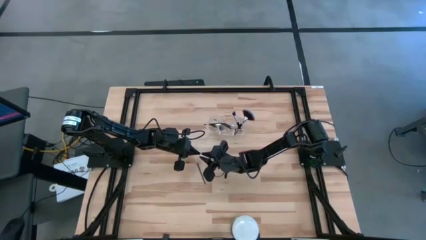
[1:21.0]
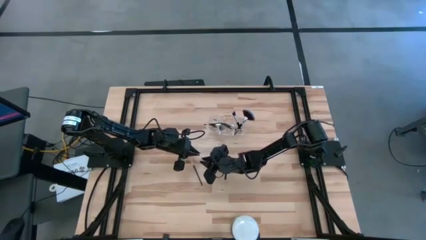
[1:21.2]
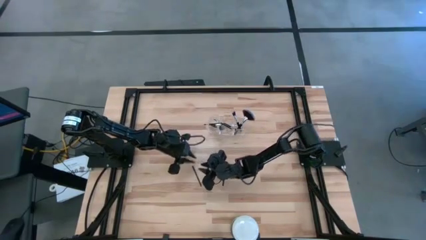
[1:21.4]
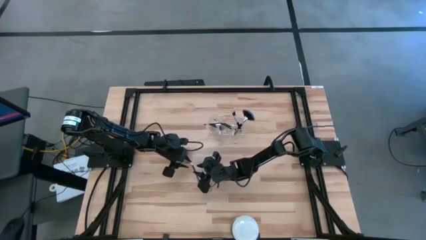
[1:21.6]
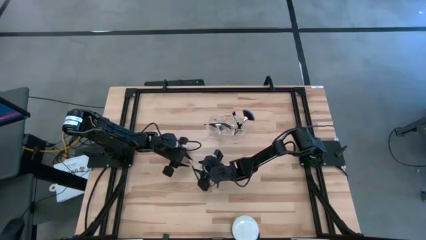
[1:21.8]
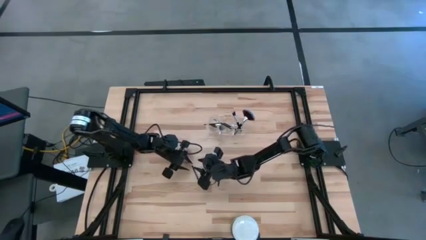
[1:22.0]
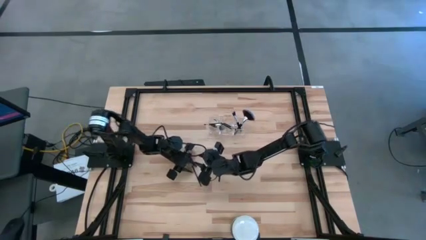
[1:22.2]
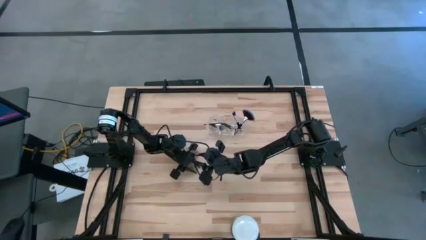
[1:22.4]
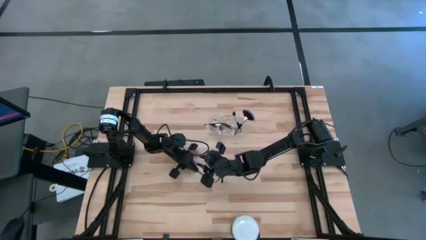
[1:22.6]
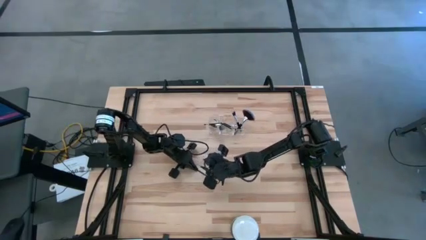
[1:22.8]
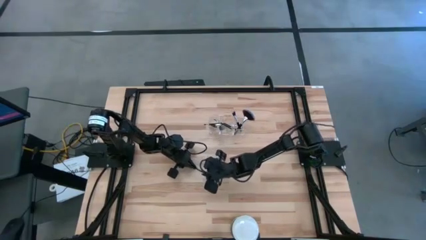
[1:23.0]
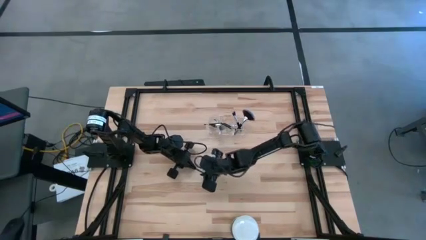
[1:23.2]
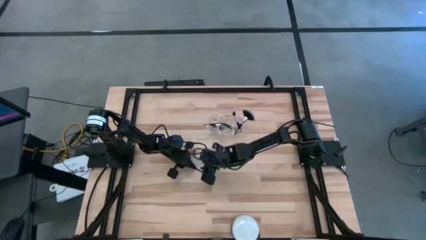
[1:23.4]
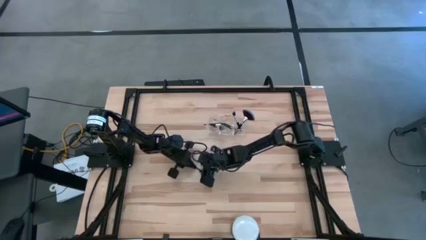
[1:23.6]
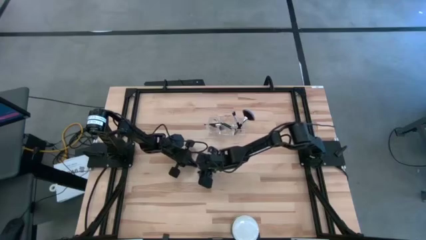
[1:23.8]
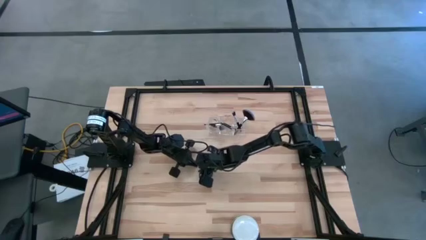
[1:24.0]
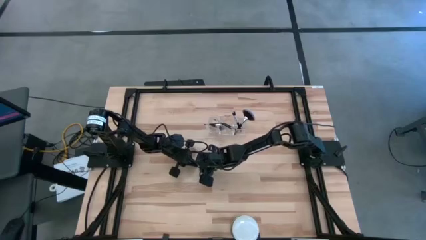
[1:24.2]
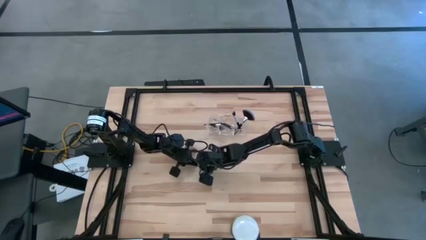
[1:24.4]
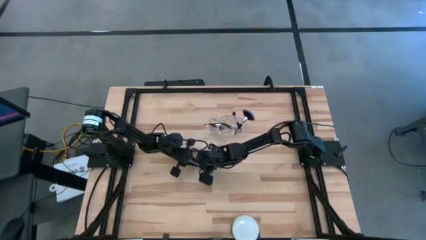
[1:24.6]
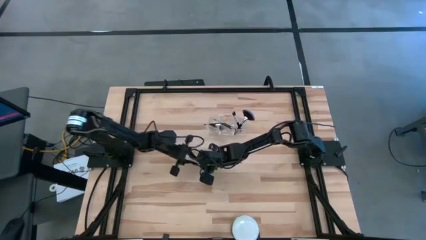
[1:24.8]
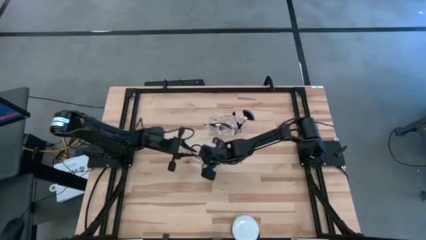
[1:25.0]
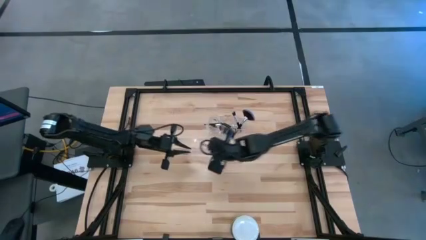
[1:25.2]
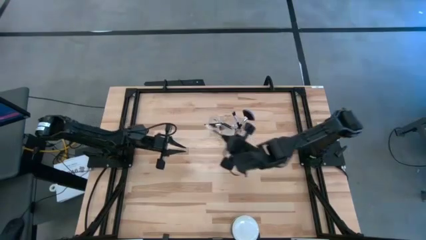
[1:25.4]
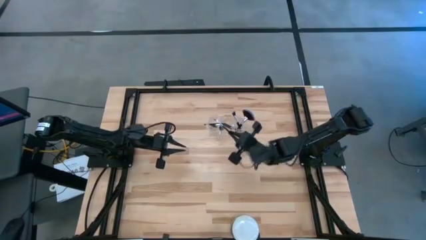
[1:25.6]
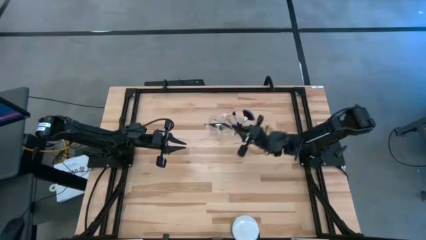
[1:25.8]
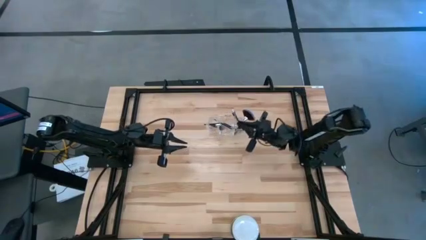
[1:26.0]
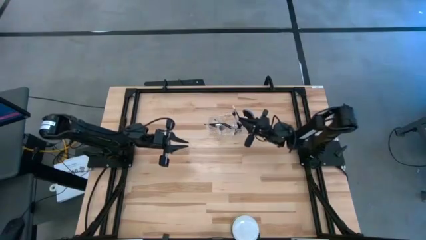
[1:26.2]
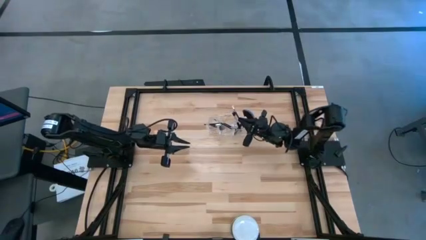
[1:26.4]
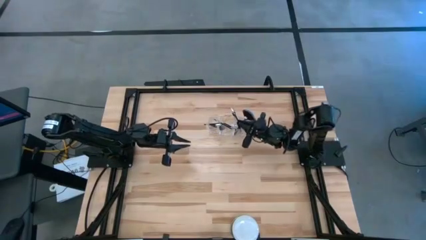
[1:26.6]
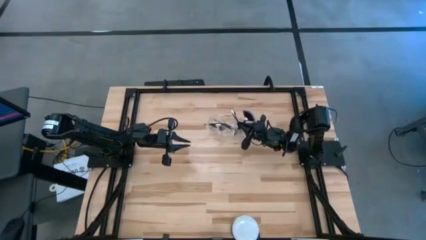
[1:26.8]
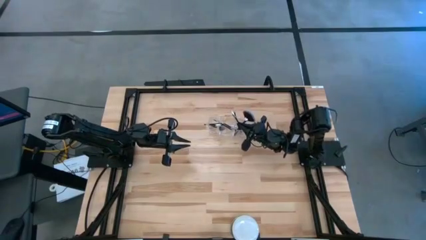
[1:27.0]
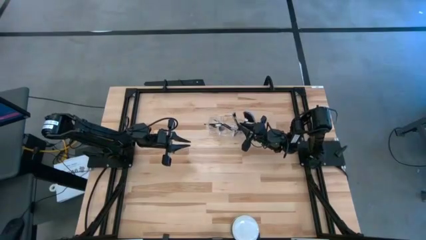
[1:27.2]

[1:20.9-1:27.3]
Task: Put items in baskets/containers
Put the black eyeshadow brush into the transparent organizer

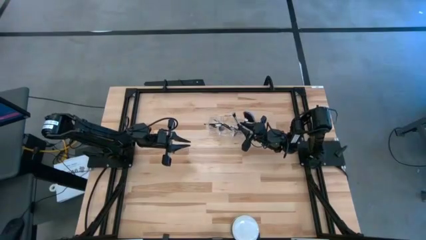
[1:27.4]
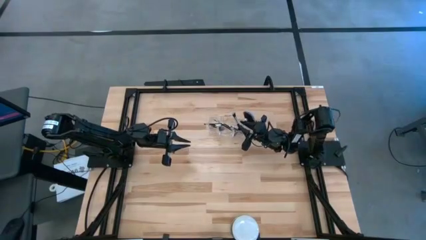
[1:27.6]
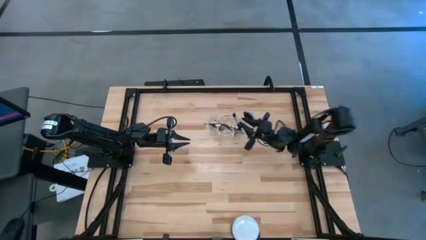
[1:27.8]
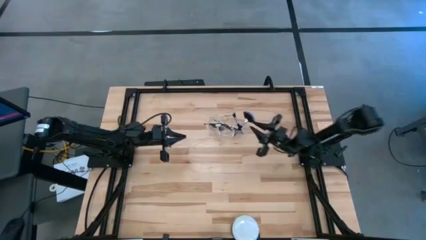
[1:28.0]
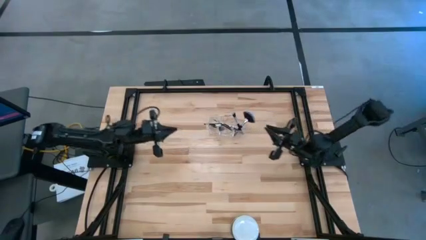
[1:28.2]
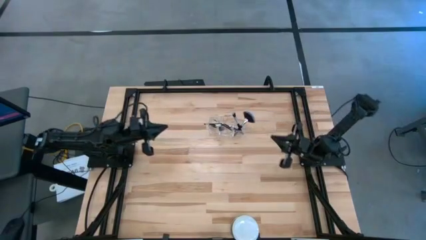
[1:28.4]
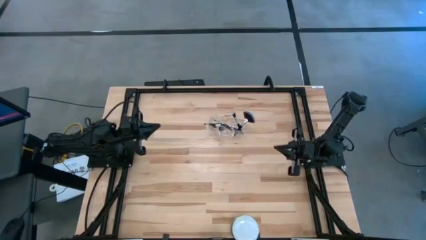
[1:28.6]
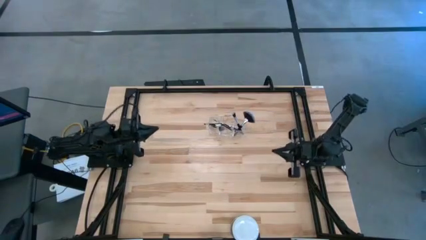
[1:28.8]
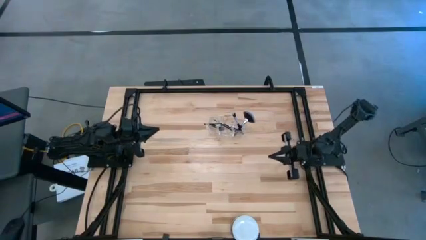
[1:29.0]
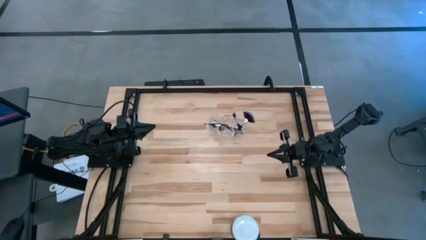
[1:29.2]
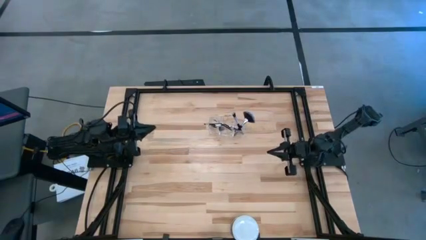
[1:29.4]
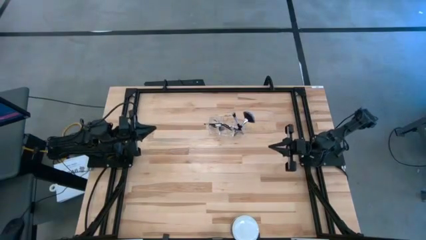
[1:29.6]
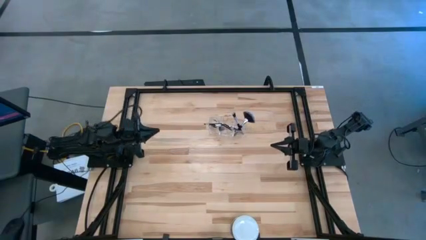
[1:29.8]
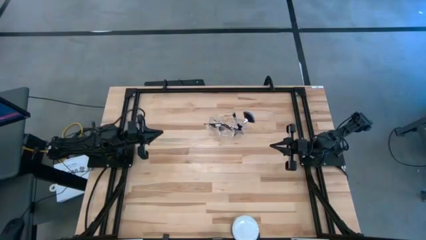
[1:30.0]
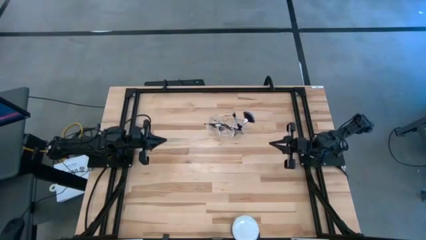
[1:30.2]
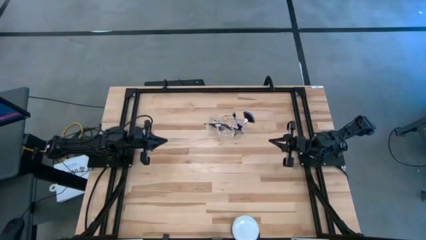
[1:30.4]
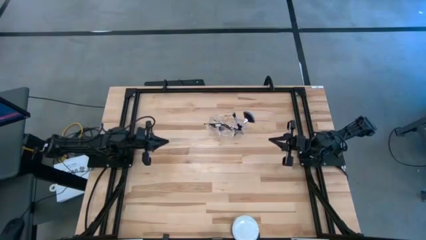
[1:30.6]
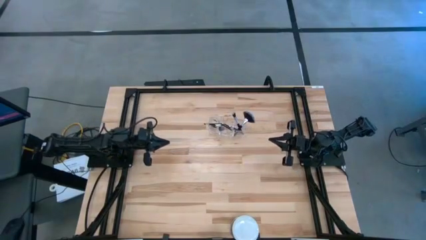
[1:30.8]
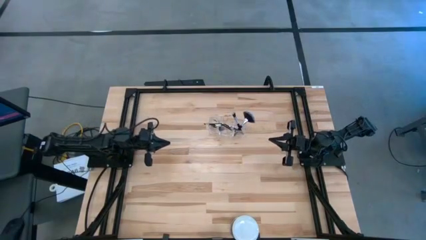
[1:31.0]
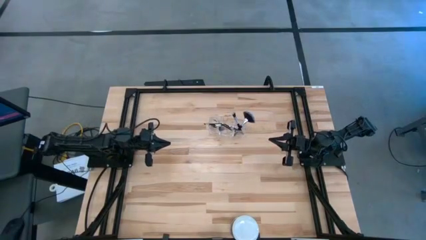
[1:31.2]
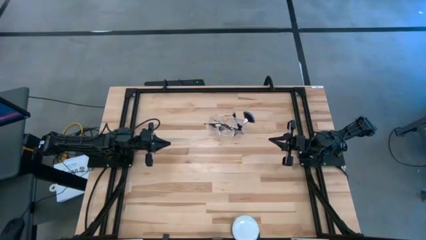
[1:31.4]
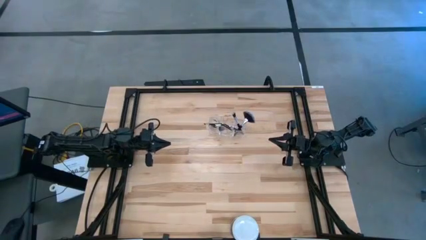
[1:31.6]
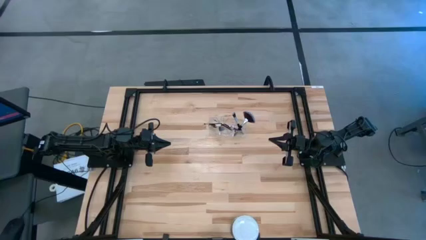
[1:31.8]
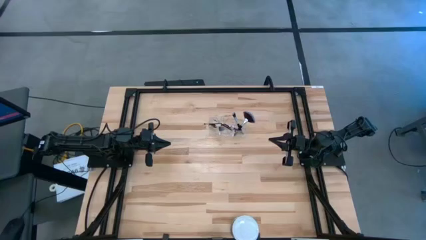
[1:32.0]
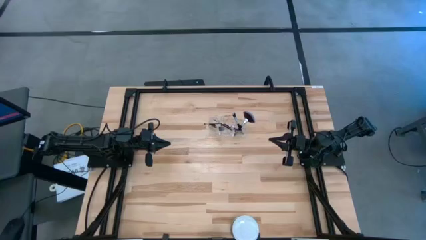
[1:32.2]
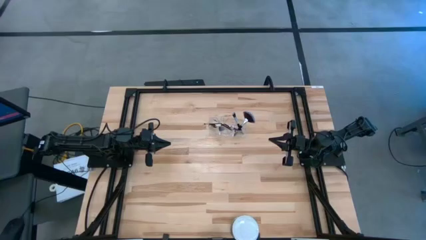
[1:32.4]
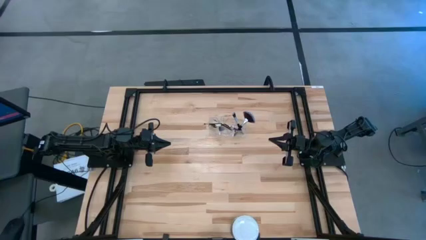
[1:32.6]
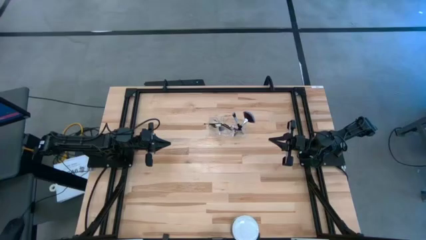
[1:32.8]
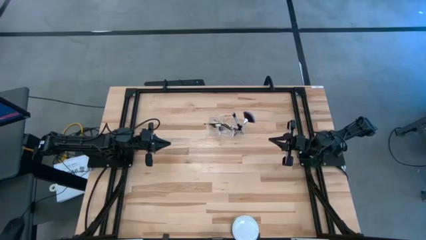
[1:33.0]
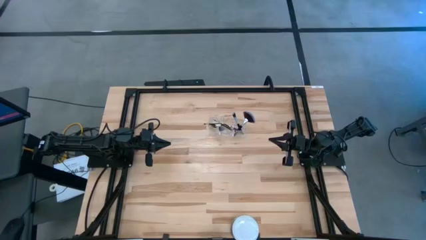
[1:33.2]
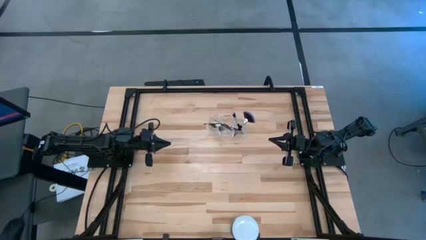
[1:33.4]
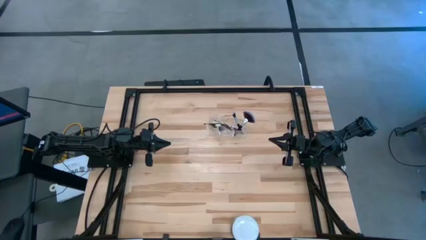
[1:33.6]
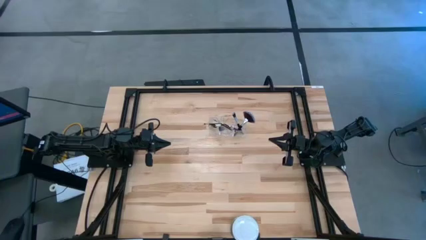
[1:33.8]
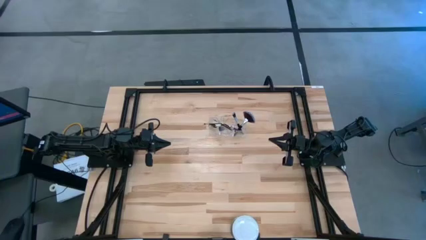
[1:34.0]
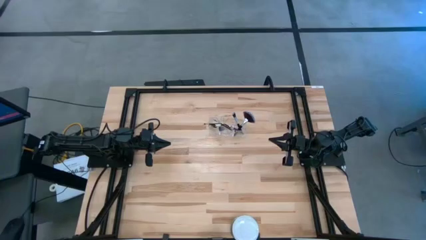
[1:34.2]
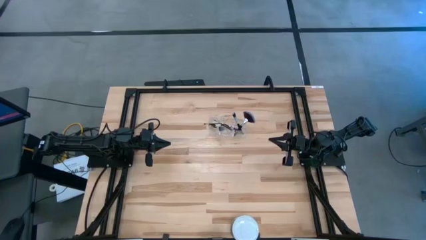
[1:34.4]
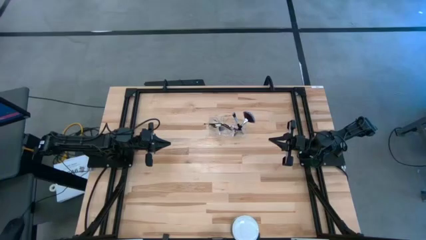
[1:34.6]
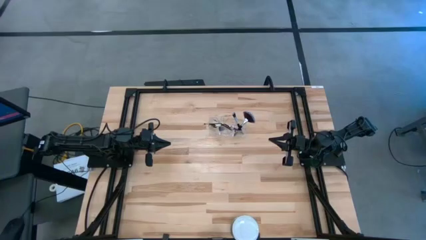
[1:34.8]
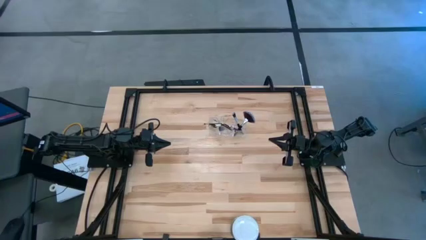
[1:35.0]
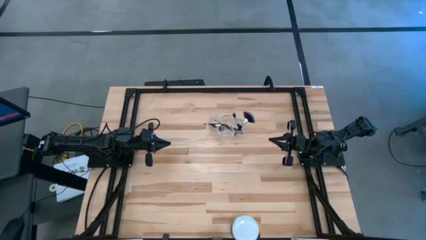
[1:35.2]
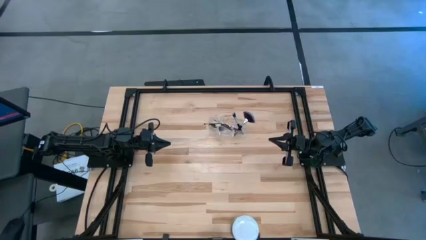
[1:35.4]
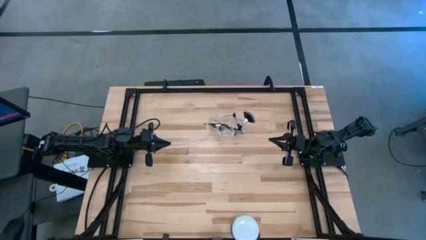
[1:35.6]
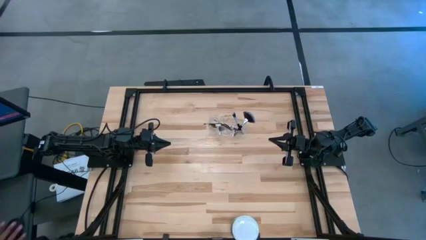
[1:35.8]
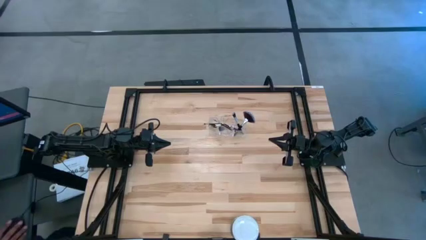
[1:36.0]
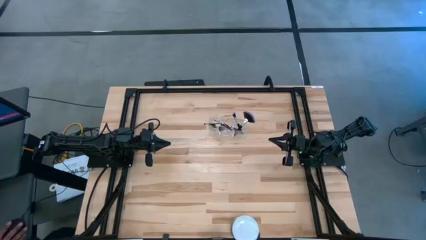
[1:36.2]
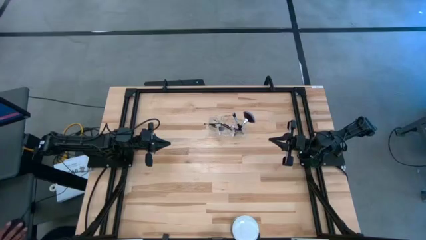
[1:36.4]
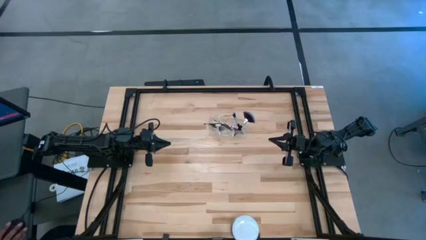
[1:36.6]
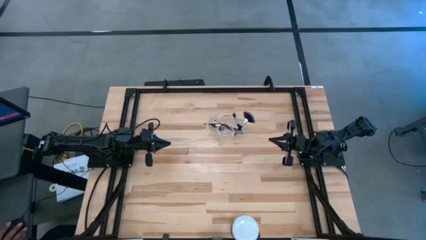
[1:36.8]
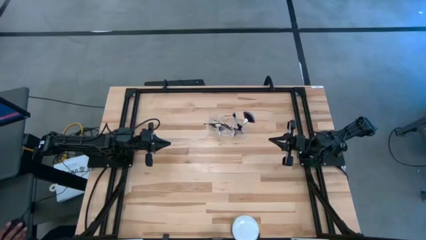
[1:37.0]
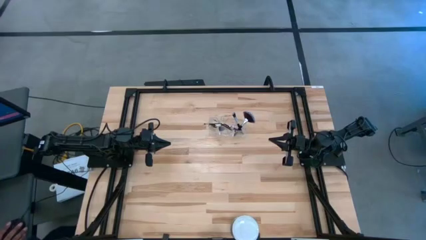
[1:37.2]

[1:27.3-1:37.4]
Return to Home Position
